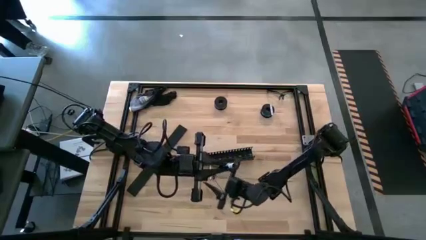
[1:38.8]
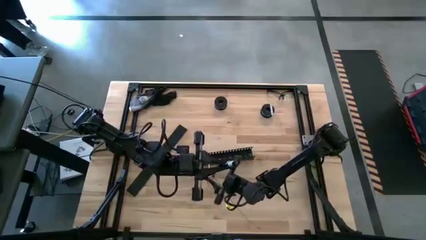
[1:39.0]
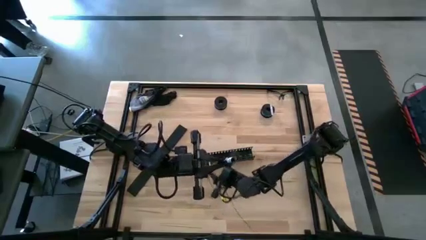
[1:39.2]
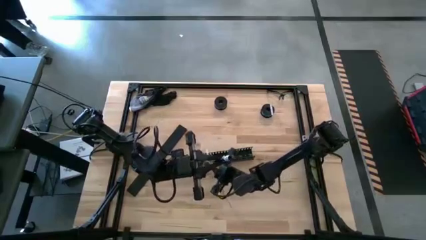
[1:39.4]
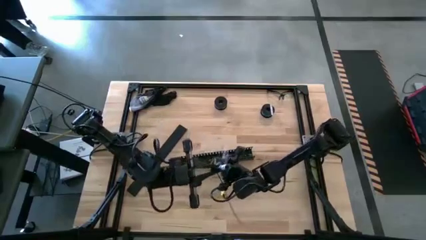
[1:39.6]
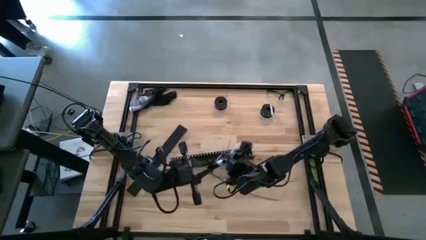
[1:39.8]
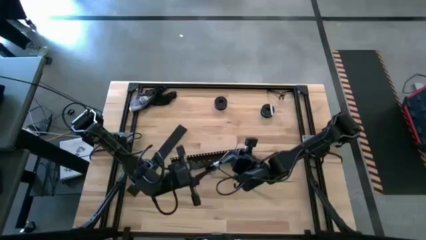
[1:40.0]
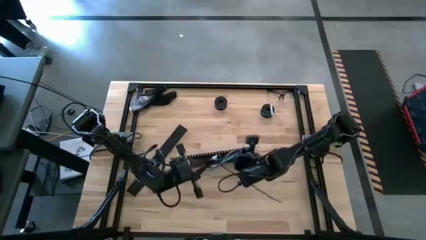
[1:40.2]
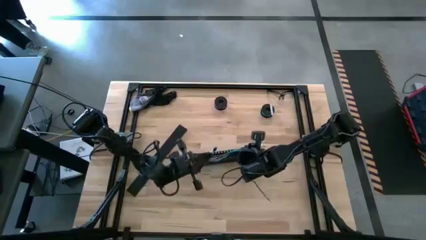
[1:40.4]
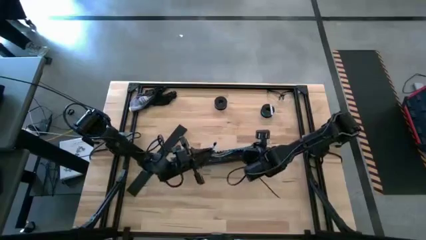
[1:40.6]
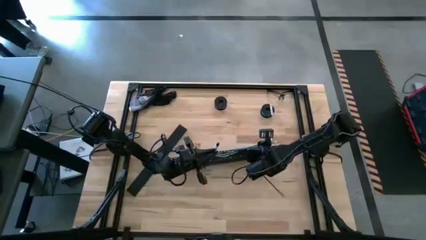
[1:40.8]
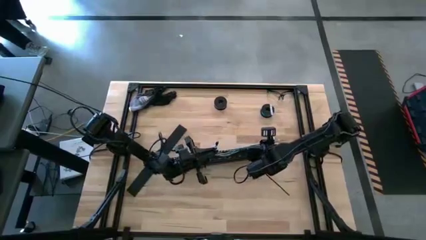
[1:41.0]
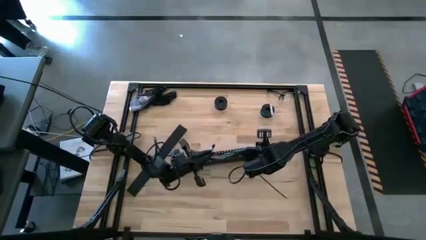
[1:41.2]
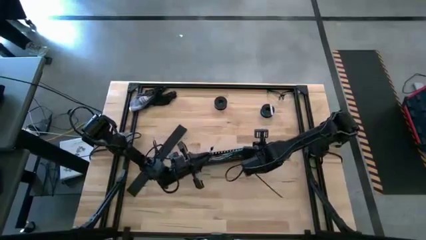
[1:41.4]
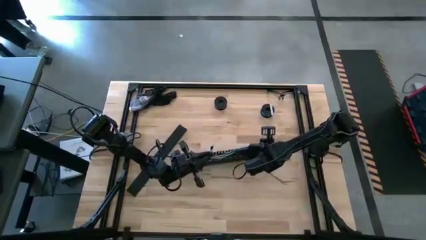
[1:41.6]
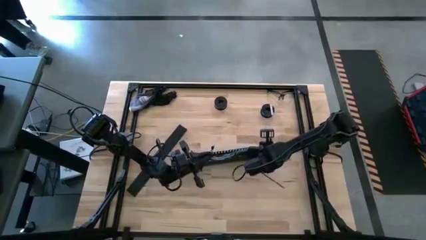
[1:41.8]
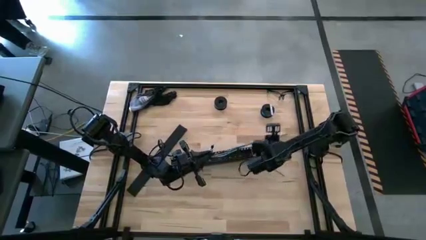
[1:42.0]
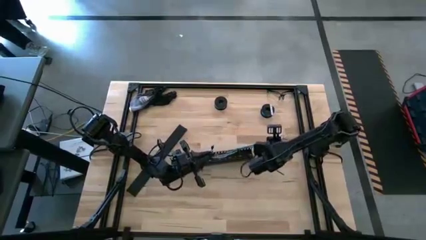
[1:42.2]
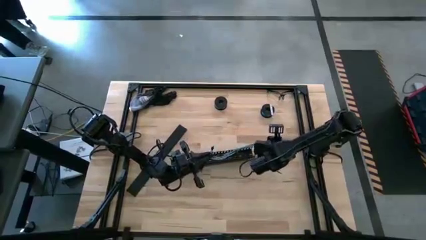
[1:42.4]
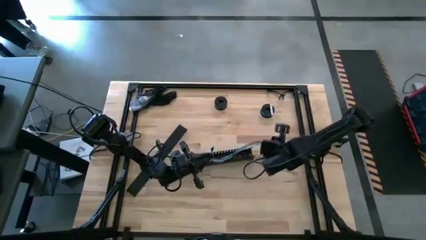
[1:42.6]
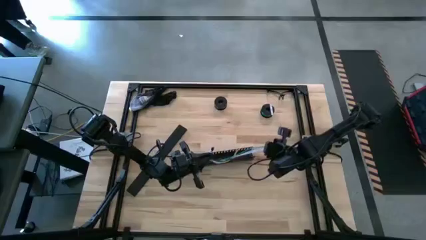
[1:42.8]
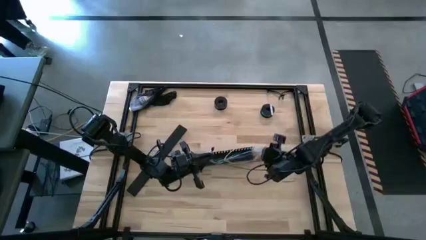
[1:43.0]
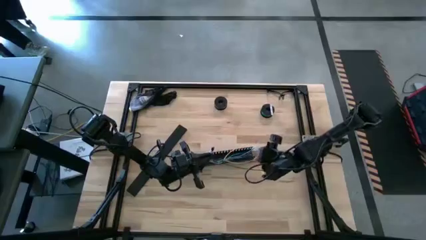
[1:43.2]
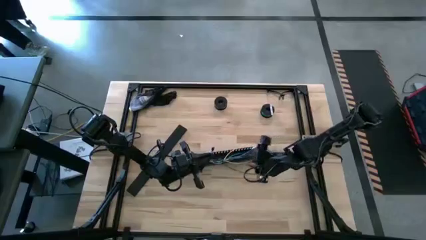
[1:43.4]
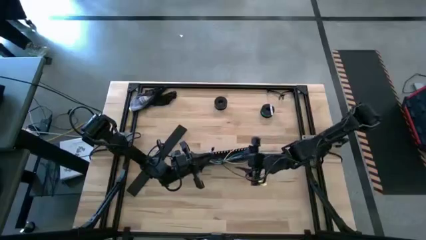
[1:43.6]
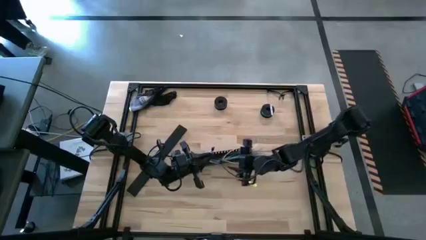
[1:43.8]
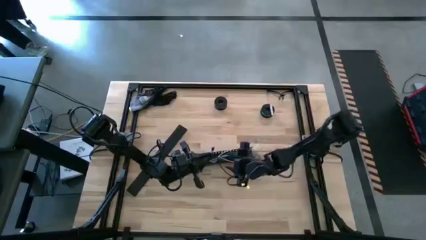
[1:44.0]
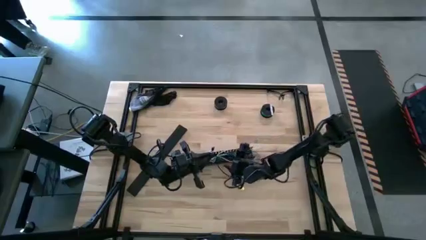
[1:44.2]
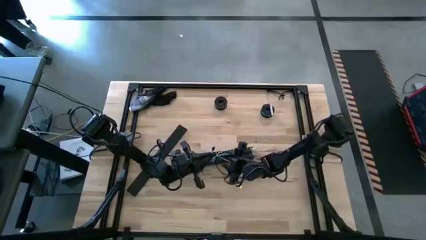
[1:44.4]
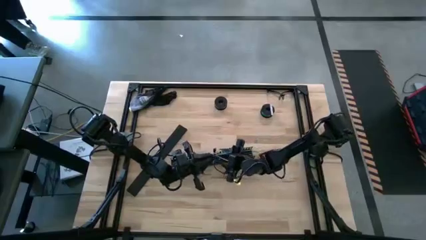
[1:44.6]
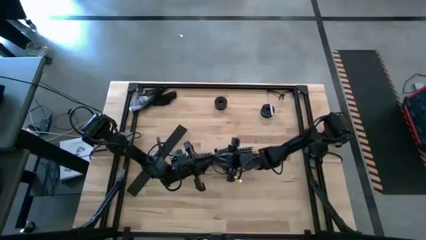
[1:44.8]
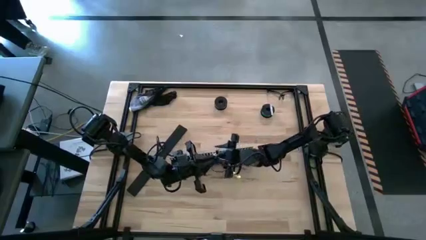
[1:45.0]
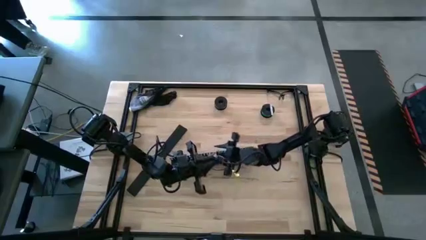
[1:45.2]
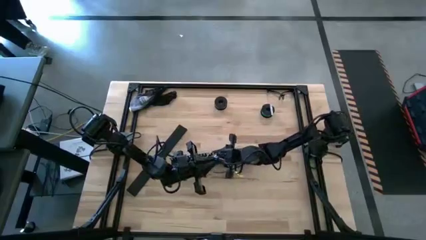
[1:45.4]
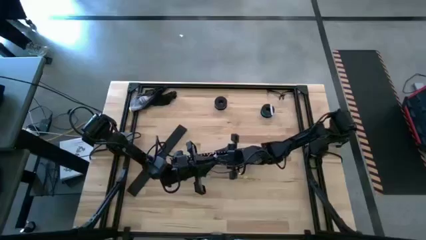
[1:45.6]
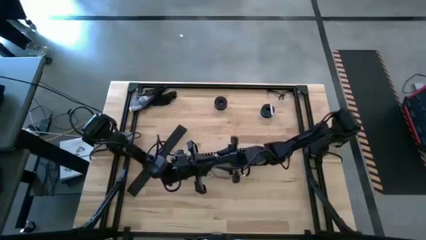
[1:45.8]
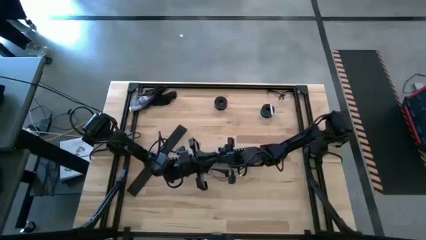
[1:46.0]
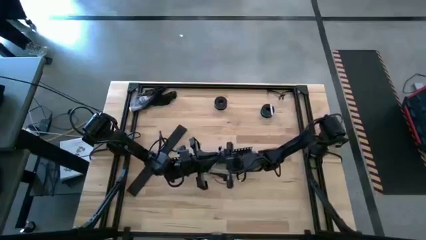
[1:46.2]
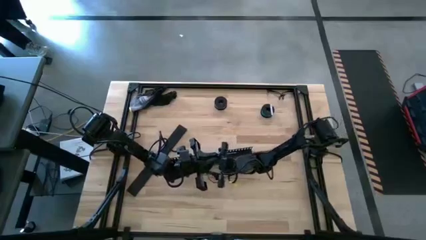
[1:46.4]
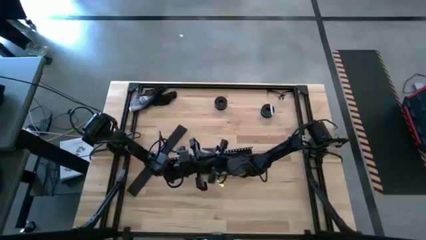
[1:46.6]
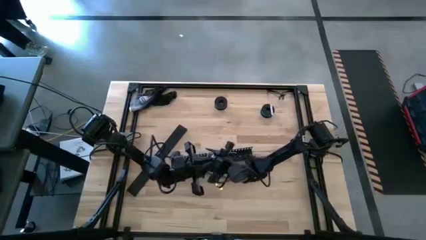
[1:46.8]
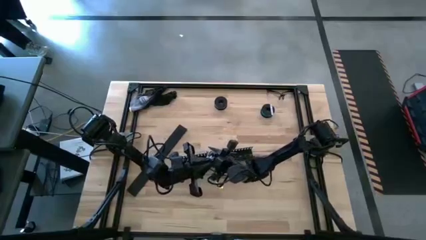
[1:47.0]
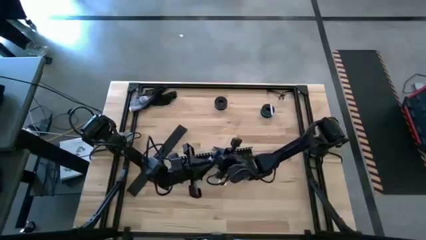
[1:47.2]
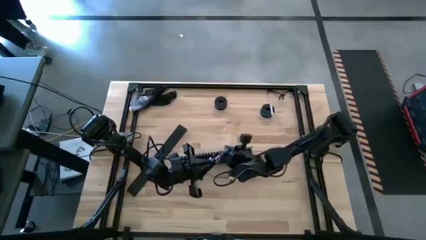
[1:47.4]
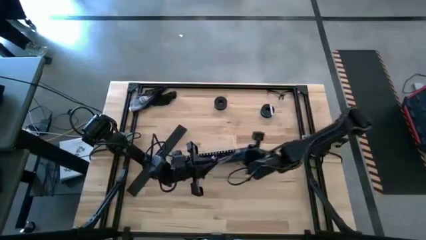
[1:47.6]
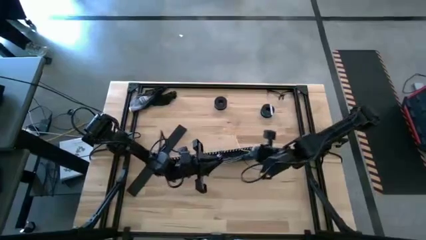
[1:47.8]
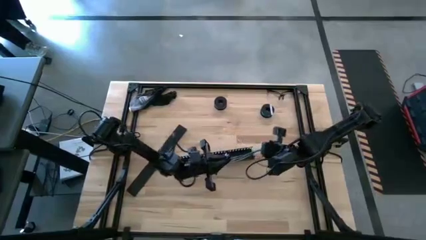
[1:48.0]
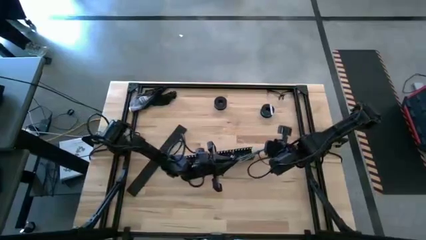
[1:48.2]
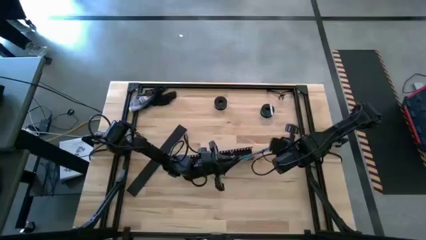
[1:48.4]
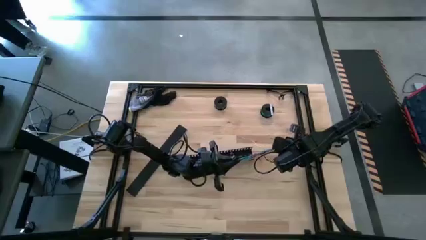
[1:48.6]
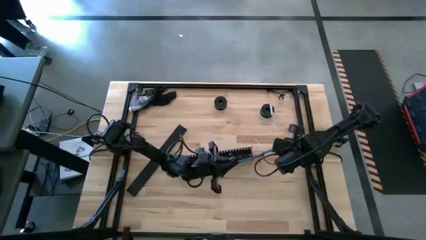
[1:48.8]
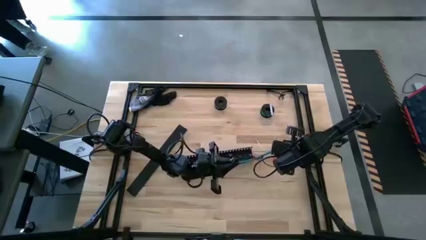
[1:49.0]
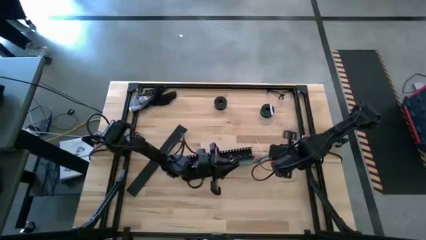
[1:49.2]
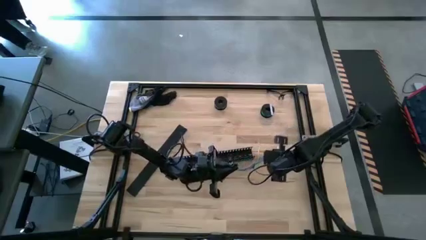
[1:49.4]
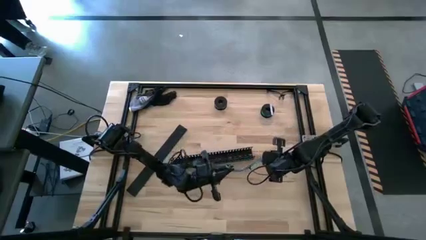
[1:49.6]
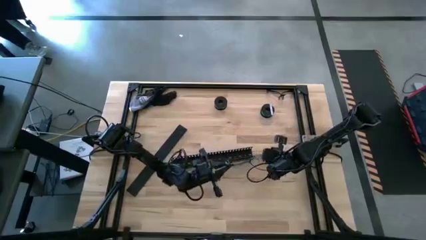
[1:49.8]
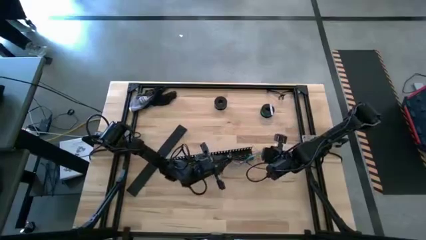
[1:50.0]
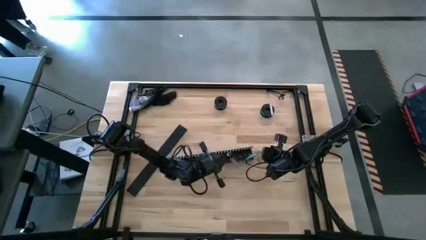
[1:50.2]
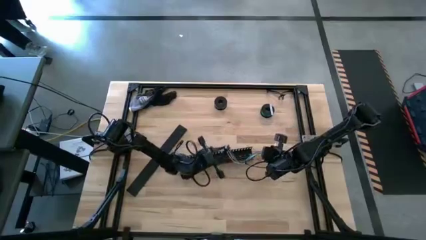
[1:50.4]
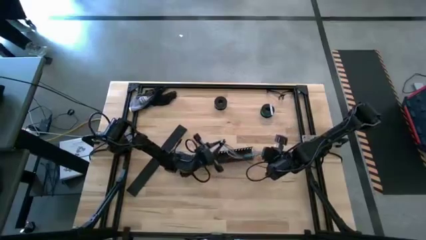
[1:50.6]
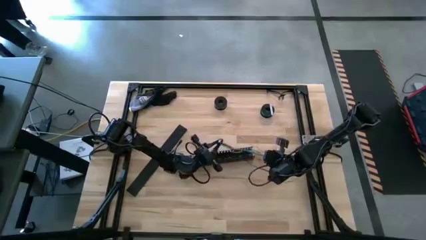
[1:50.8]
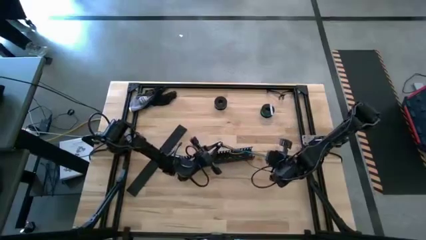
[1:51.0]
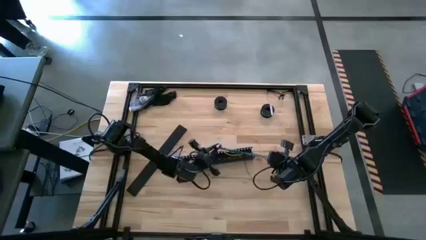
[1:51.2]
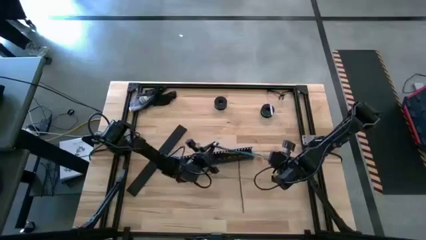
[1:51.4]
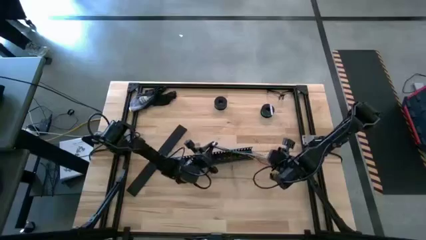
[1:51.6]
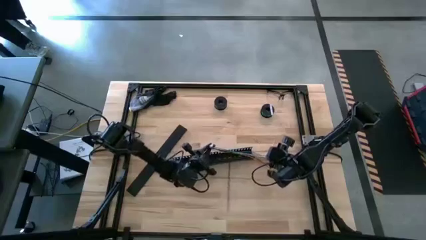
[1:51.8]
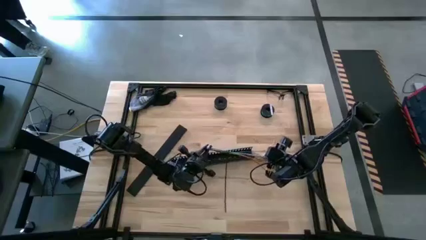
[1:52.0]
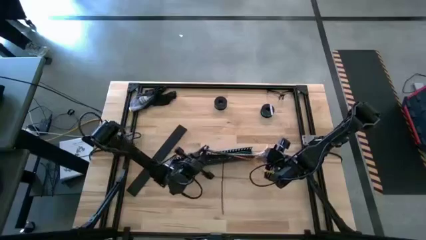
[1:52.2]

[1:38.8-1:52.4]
Task: Ziptie cables
Put the zip-tied cables into the black cable duct
